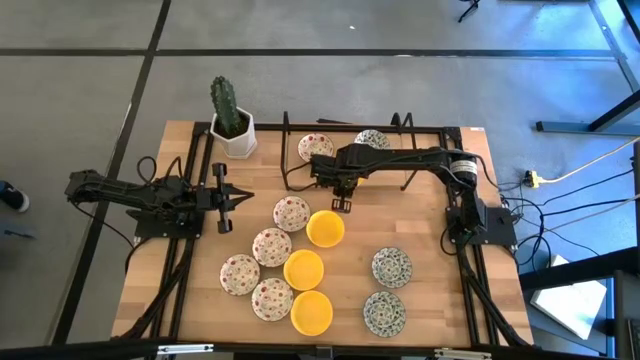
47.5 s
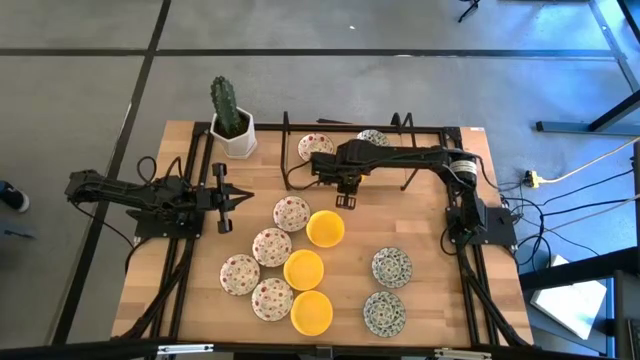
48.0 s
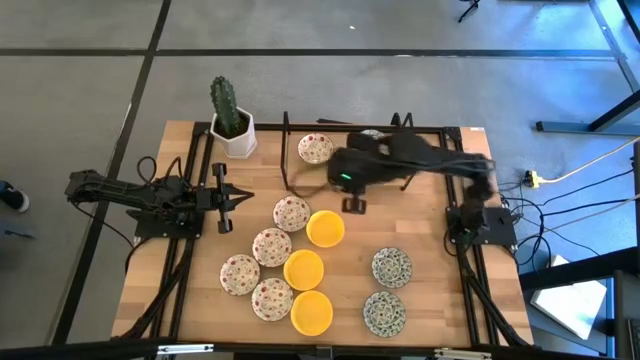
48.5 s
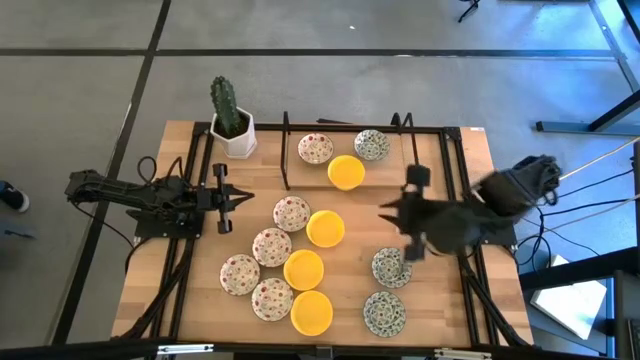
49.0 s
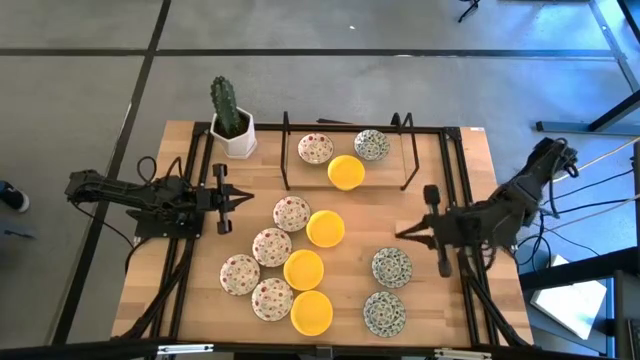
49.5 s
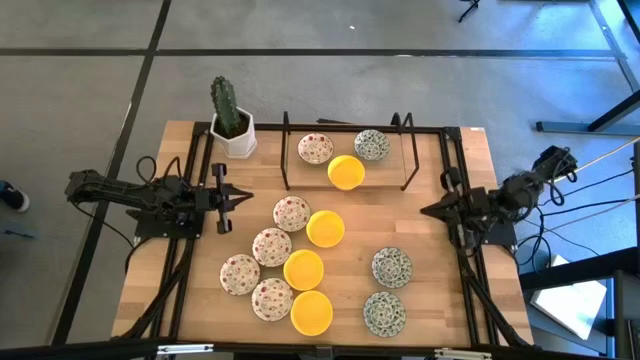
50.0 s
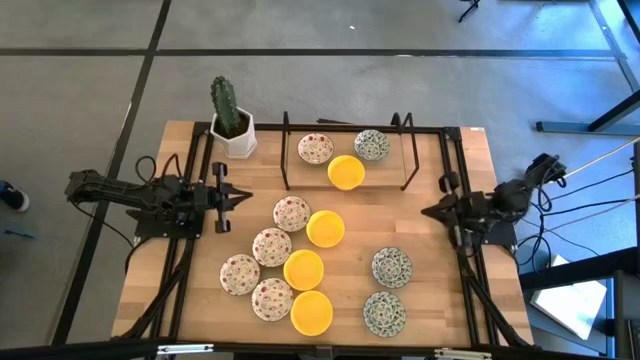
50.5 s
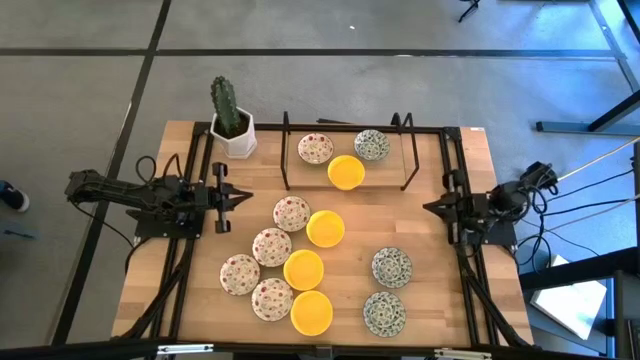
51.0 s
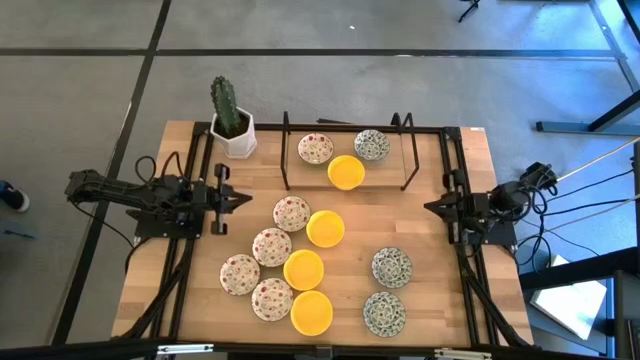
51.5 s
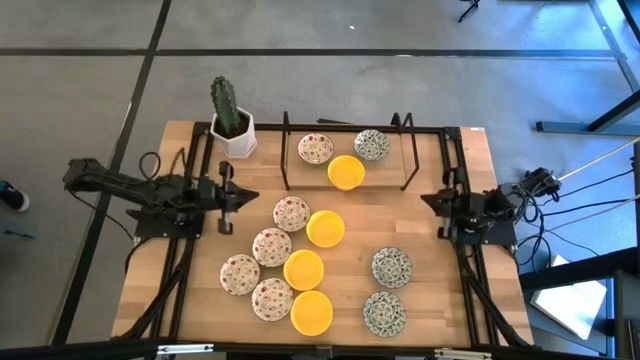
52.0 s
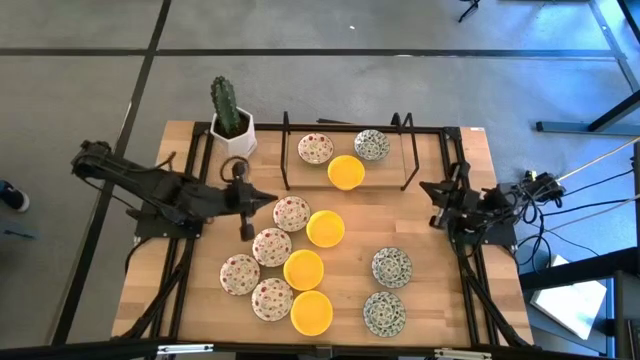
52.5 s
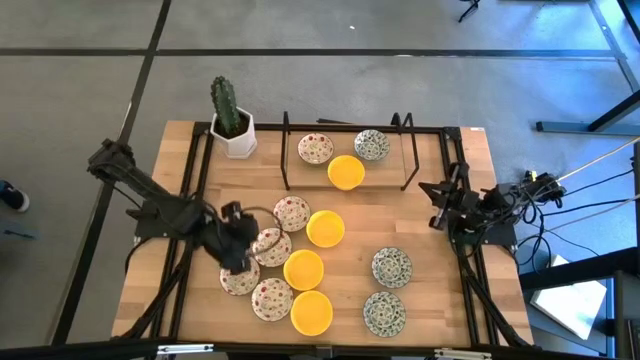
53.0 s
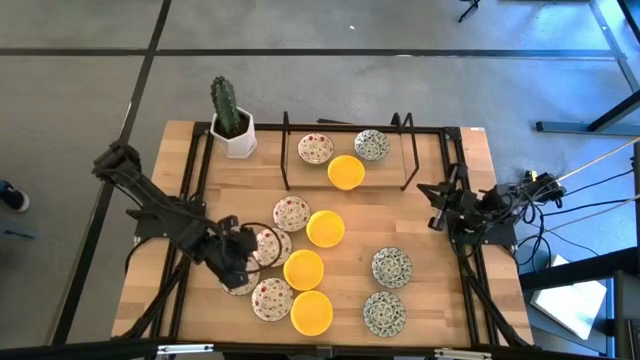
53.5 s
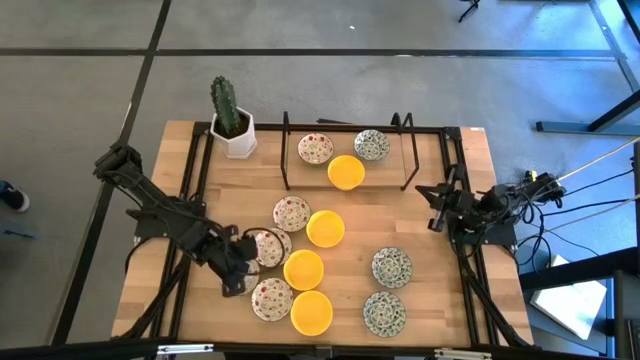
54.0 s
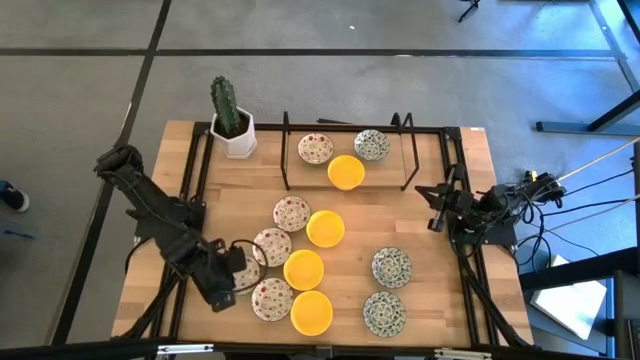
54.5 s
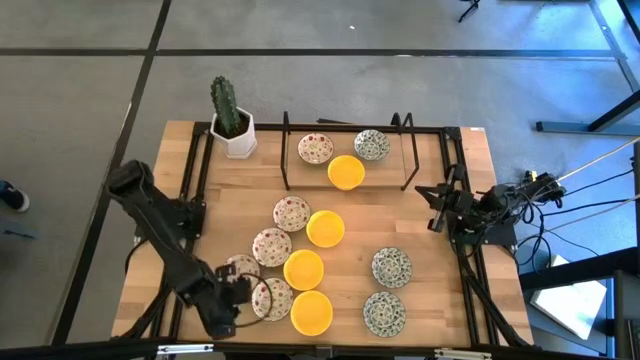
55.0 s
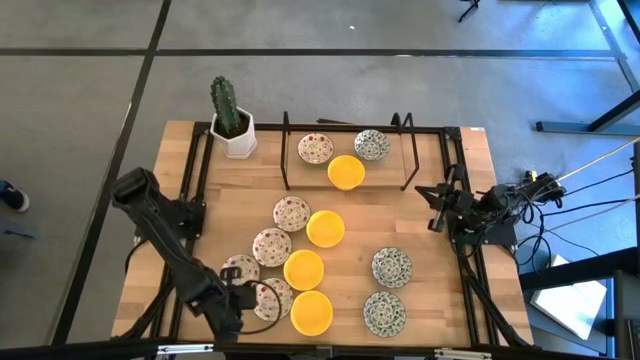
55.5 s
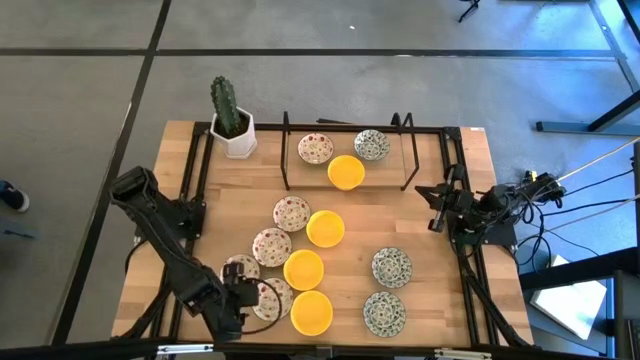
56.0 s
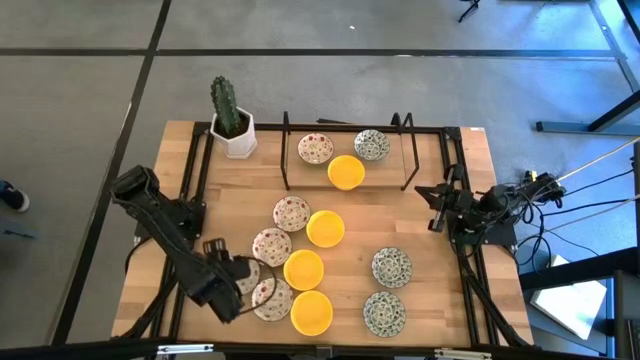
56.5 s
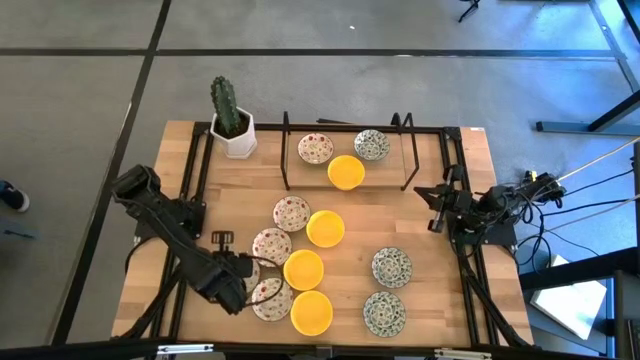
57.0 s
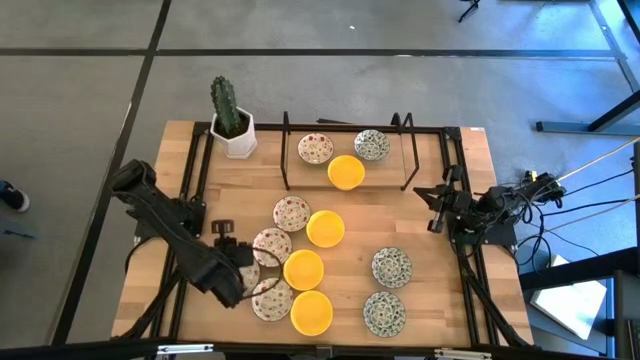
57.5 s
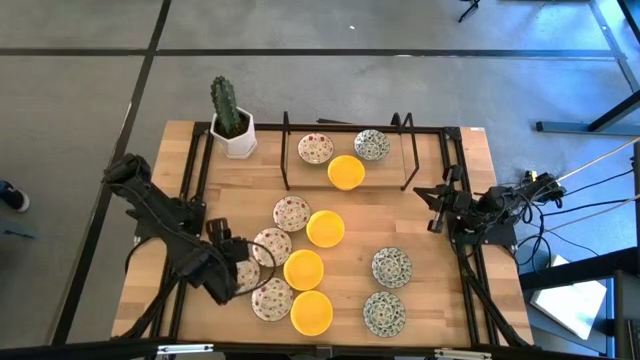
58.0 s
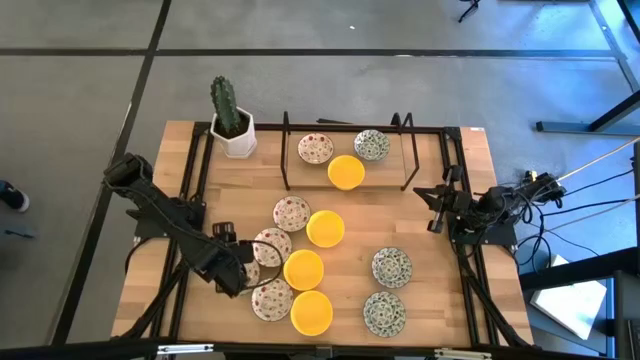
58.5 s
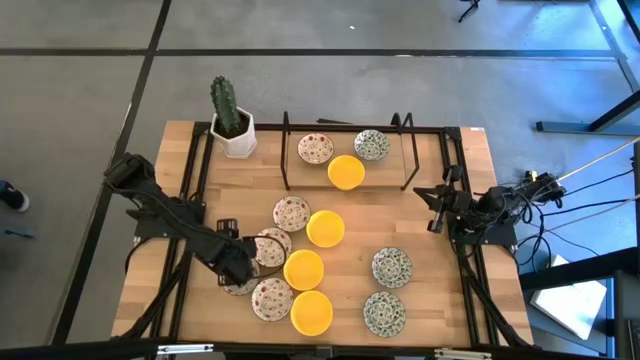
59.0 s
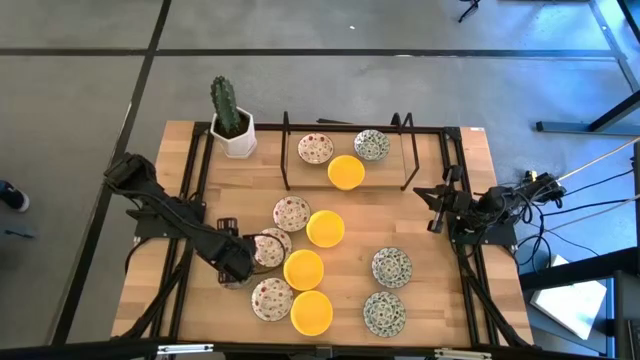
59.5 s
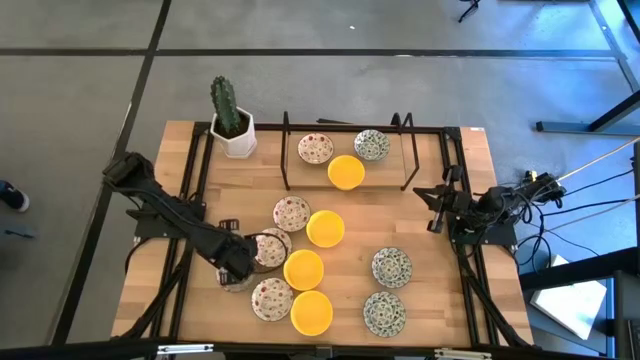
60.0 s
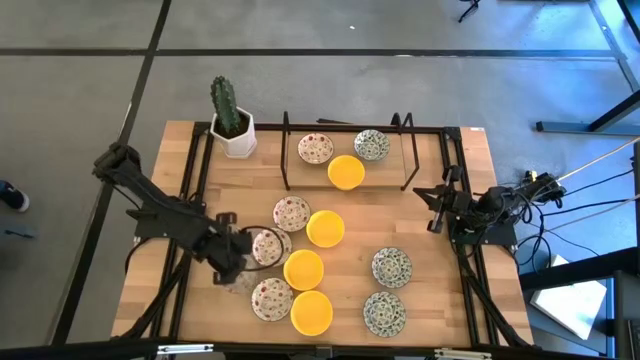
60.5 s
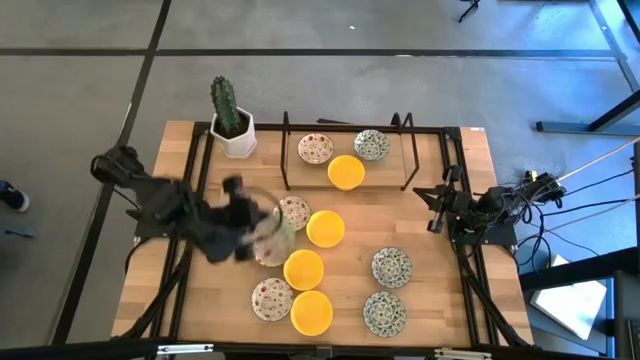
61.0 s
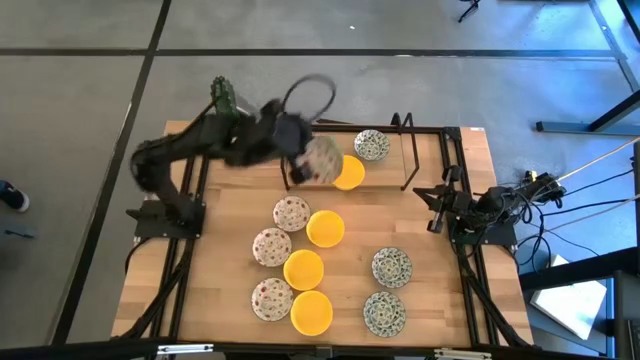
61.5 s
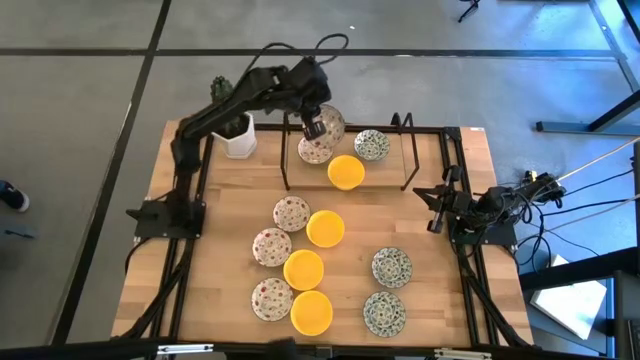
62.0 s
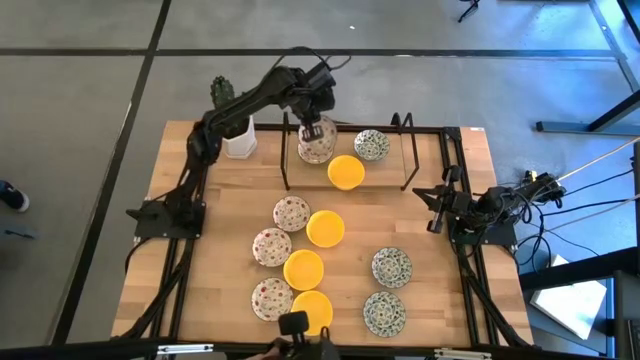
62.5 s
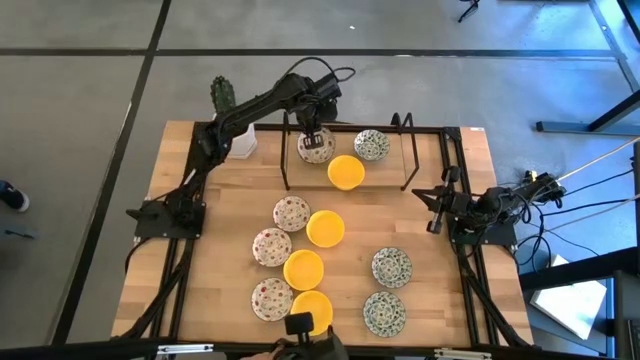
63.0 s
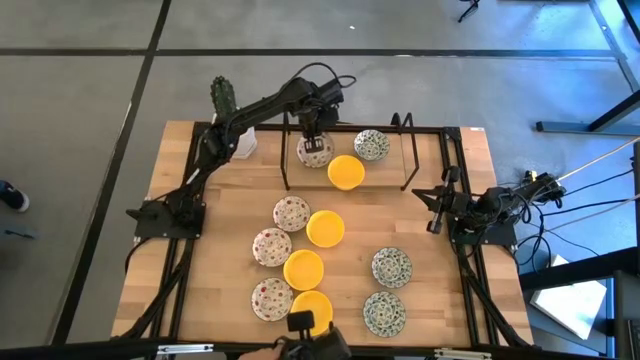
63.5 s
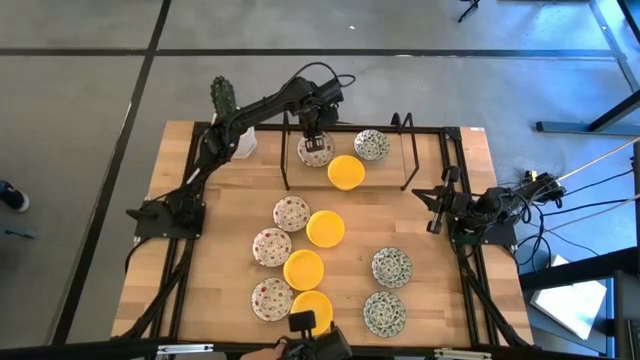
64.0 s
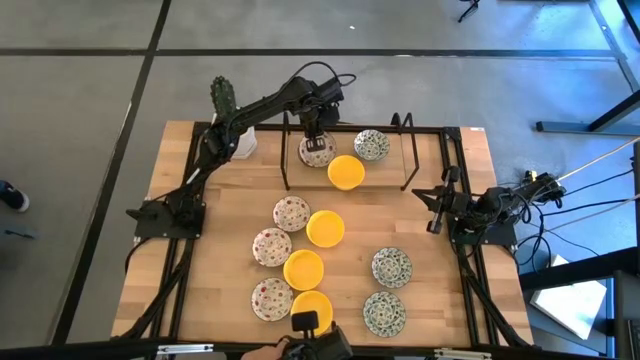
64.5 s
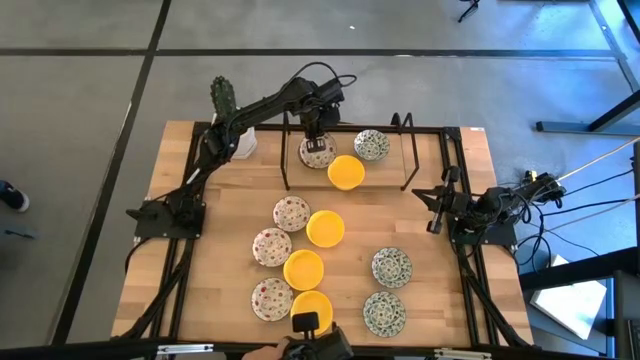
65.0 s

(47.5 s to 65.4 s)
Task: Pick & Place Mini bowls
Stack the green patterned bowl on the green patterned bowl on the shelf

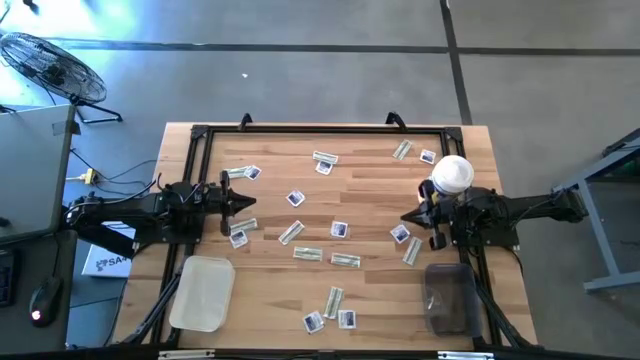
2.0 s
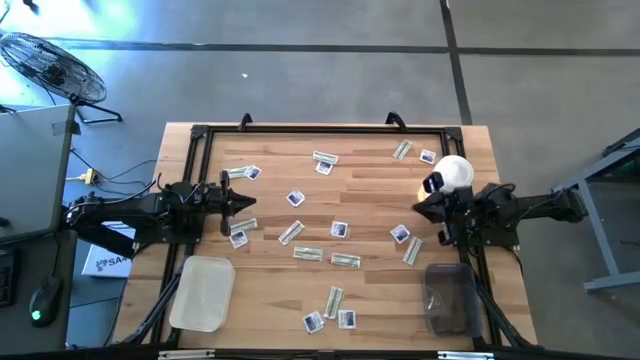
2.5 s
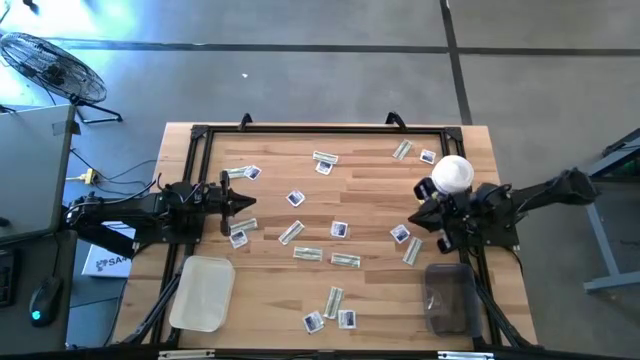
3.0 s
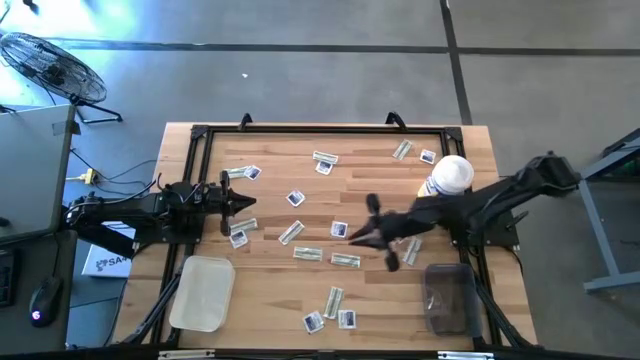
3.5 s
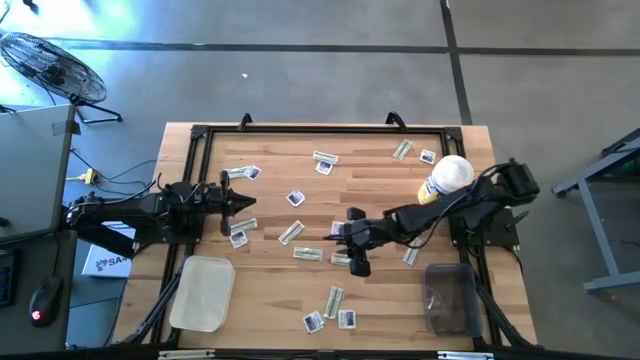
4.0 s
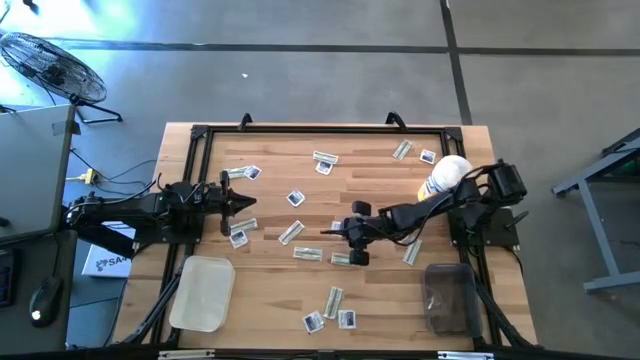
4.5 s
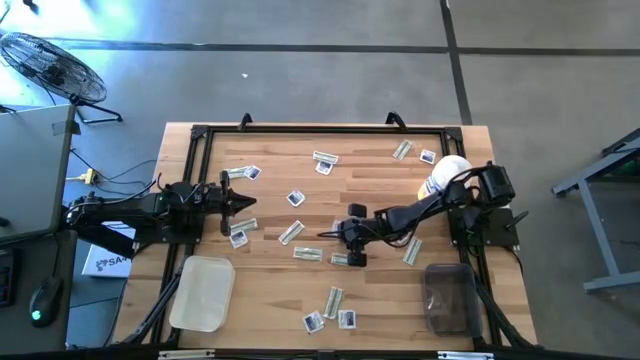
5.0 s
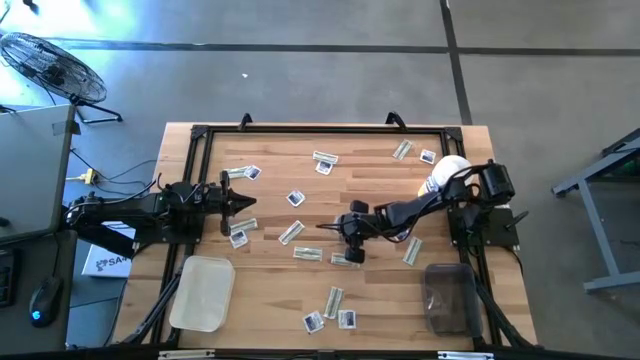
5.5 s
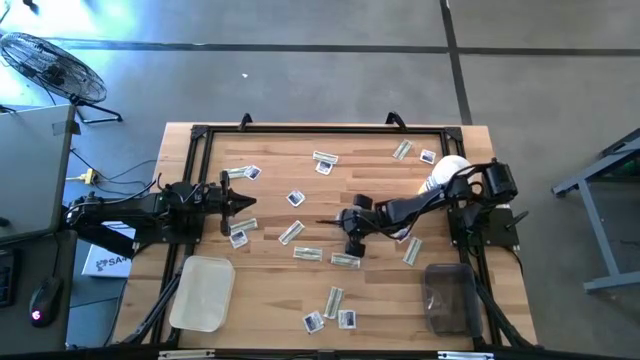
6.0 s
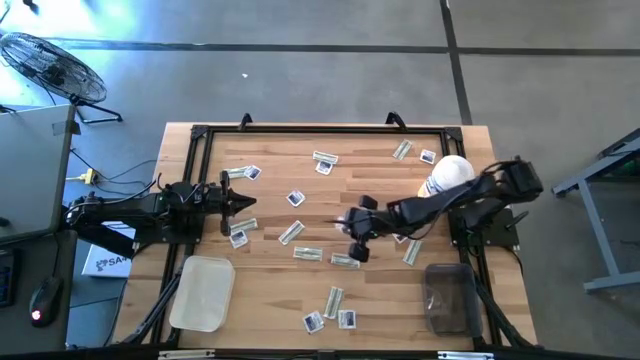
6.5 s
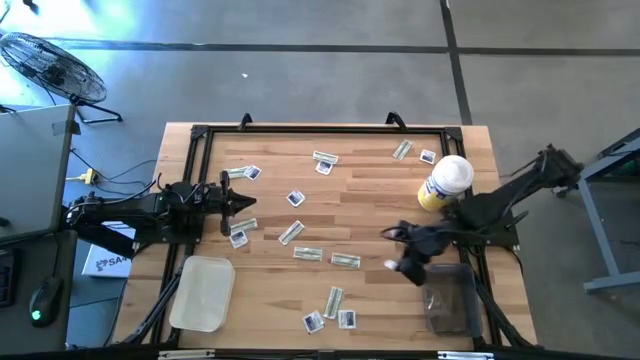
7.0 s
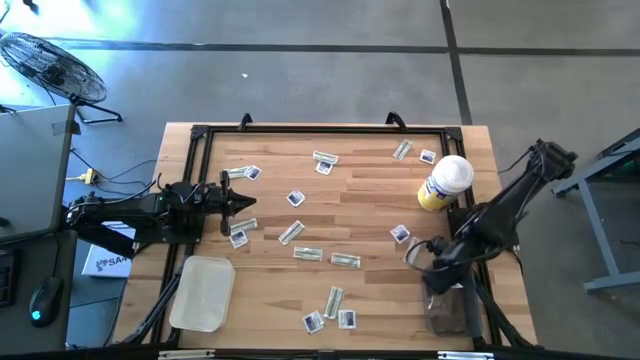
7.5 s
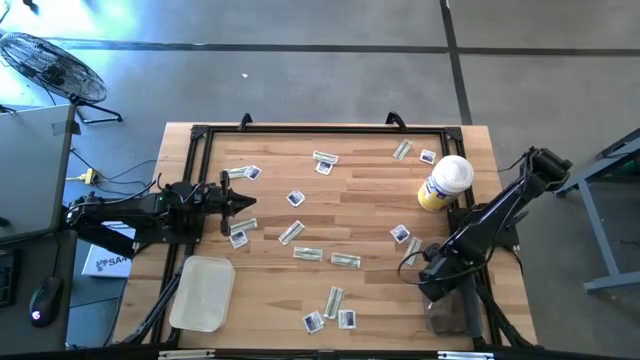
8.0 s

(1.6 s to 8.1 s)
Task: Pick & Place First Aid Supplies
Put the blue alcohol pad into the black bin
